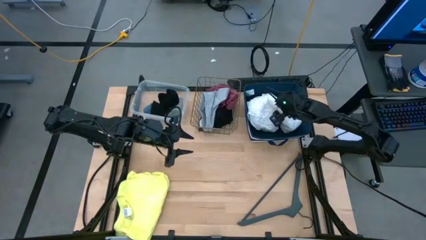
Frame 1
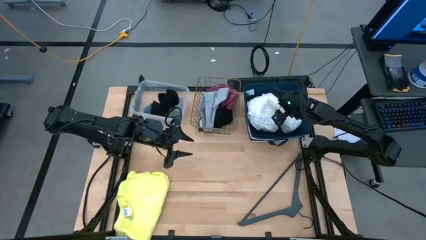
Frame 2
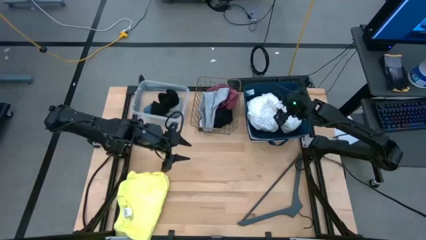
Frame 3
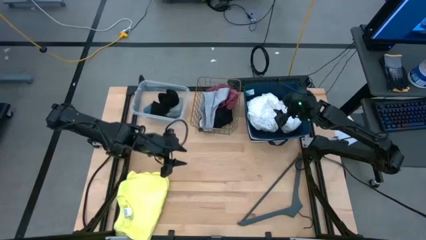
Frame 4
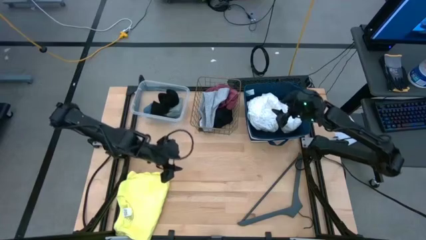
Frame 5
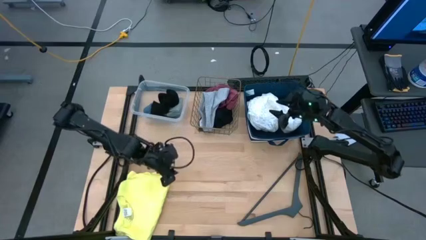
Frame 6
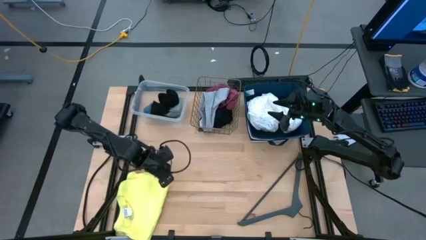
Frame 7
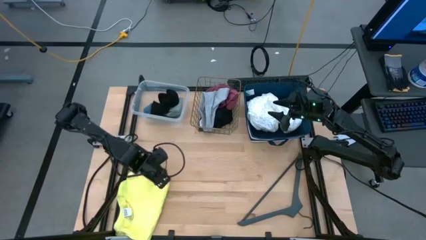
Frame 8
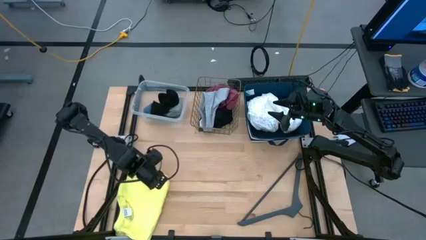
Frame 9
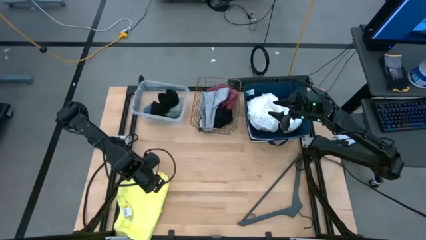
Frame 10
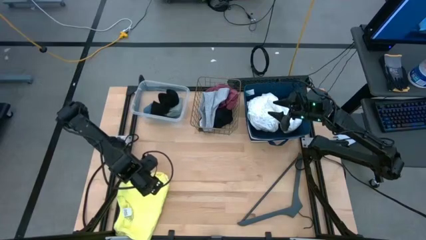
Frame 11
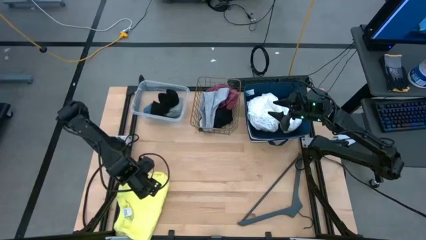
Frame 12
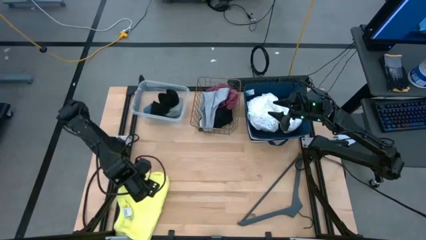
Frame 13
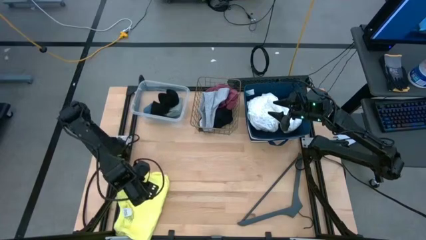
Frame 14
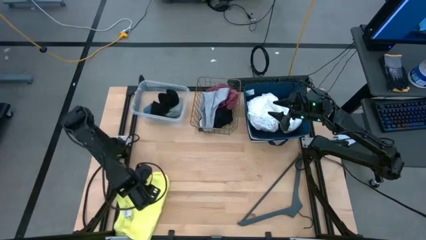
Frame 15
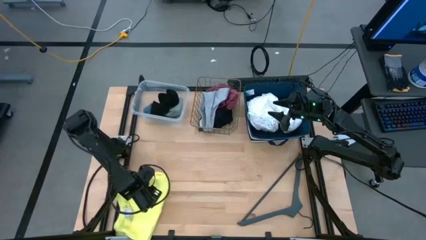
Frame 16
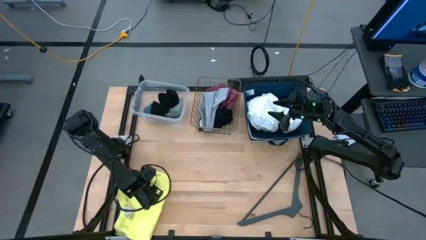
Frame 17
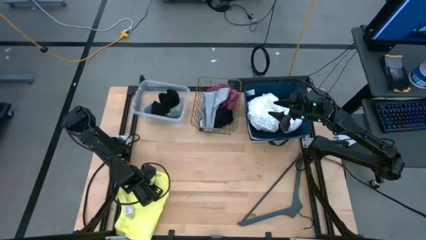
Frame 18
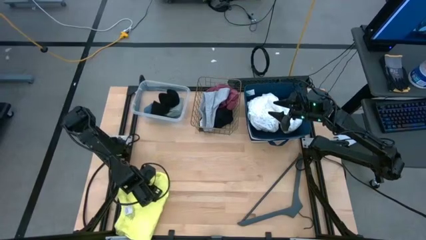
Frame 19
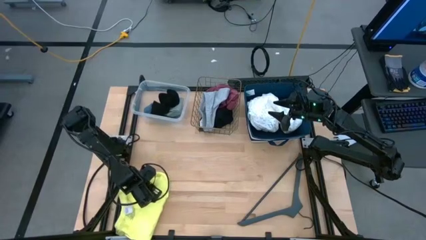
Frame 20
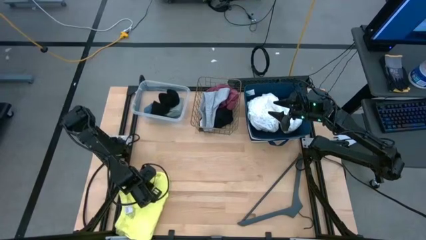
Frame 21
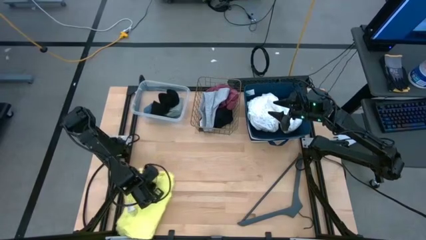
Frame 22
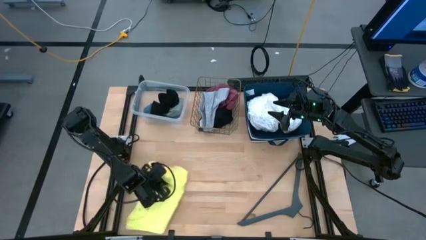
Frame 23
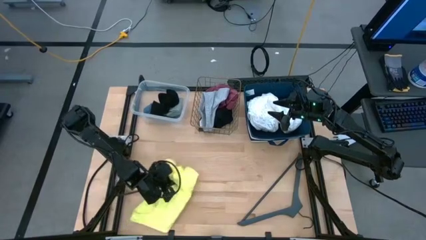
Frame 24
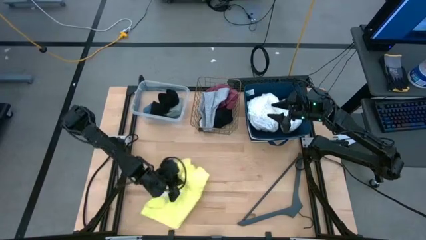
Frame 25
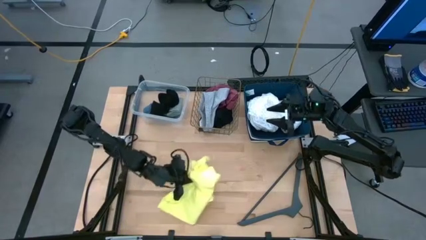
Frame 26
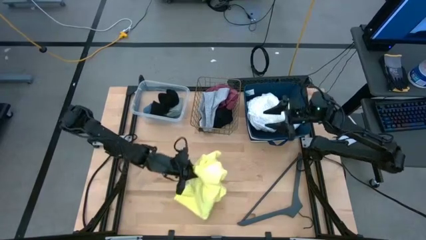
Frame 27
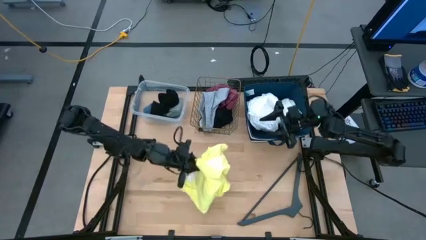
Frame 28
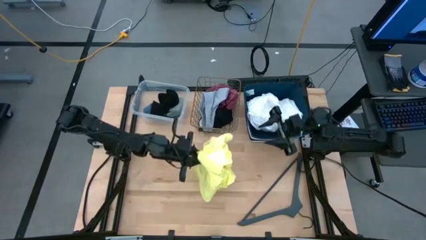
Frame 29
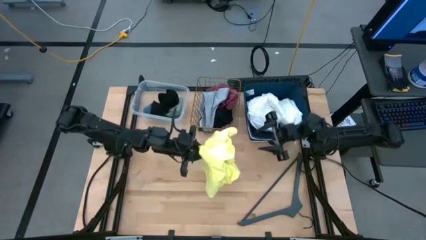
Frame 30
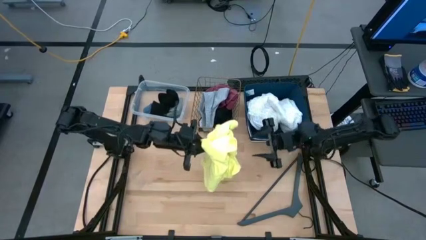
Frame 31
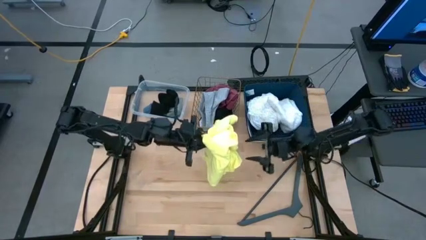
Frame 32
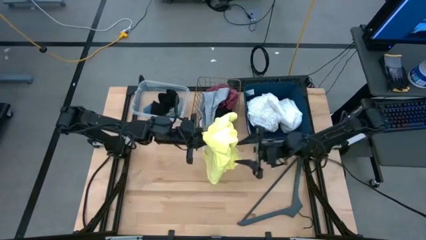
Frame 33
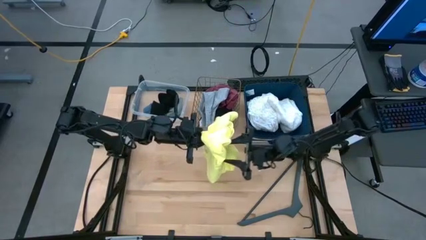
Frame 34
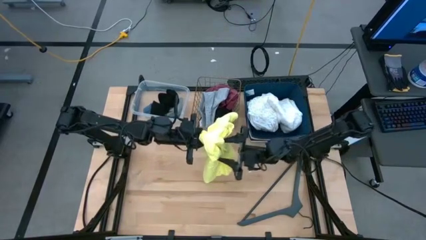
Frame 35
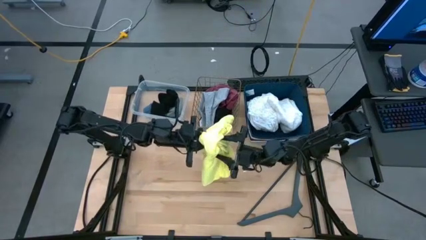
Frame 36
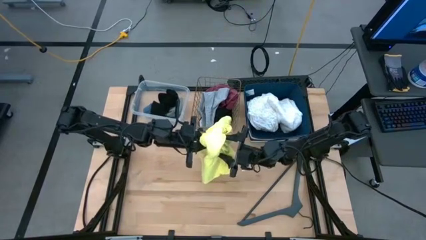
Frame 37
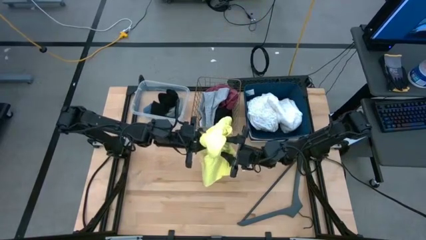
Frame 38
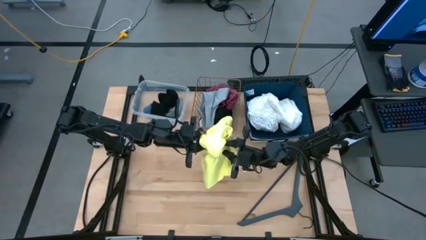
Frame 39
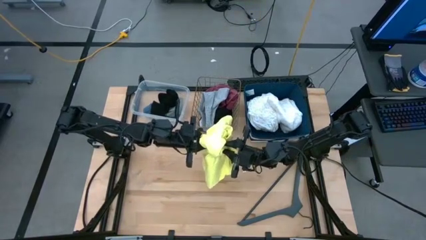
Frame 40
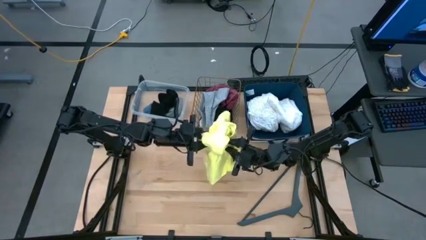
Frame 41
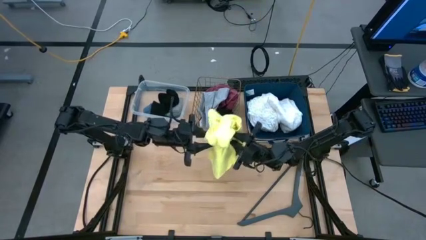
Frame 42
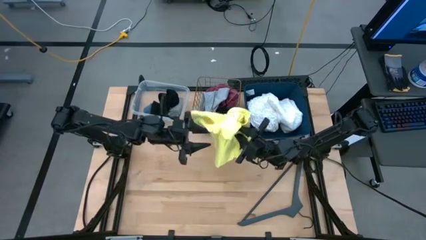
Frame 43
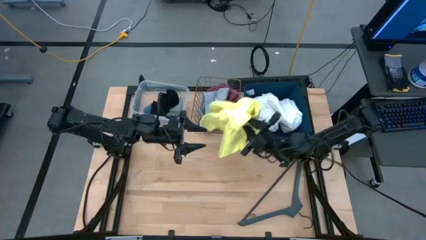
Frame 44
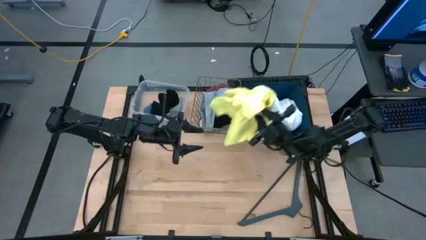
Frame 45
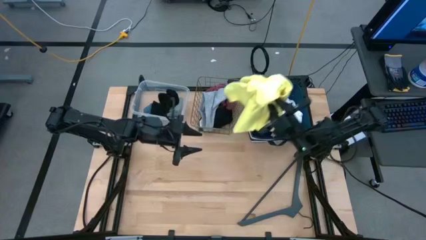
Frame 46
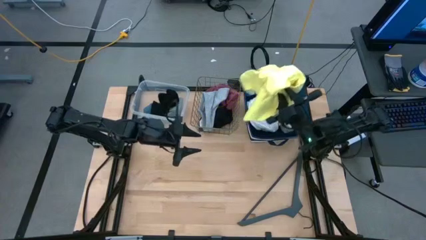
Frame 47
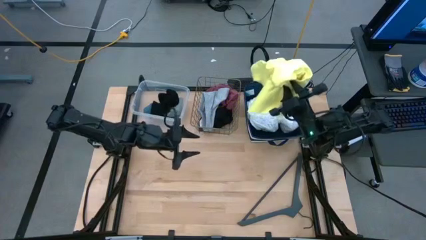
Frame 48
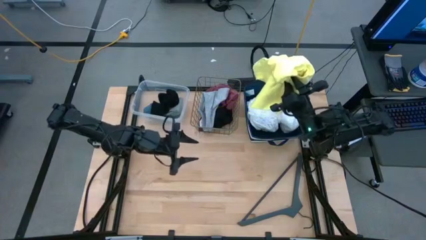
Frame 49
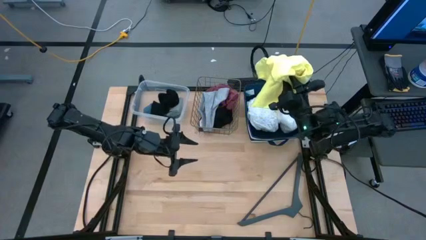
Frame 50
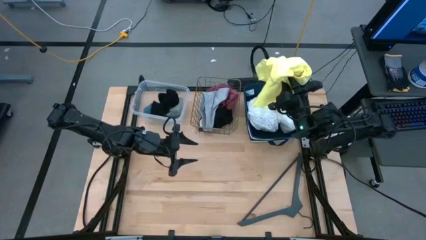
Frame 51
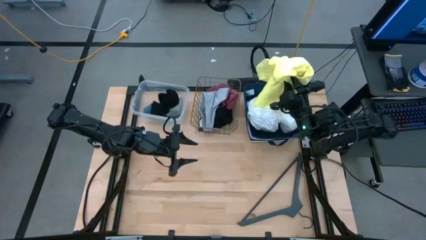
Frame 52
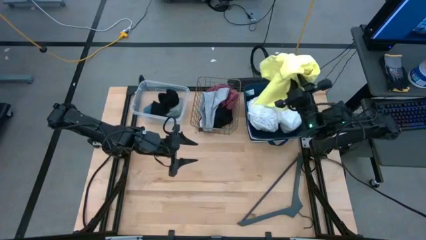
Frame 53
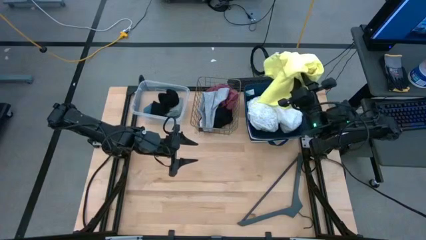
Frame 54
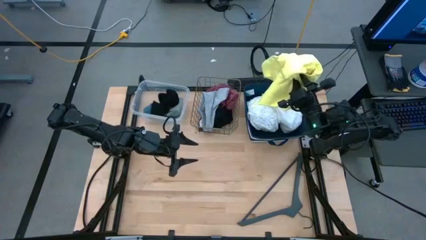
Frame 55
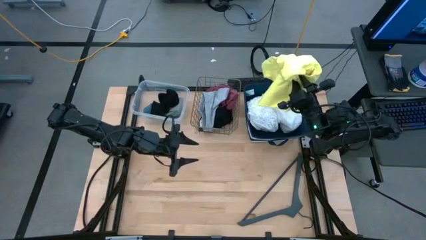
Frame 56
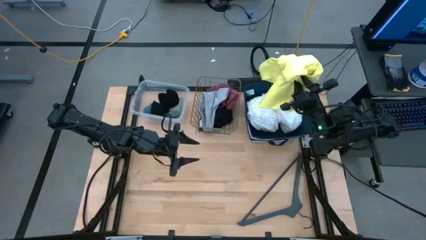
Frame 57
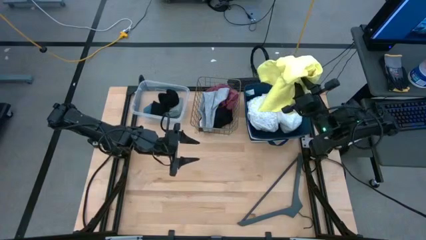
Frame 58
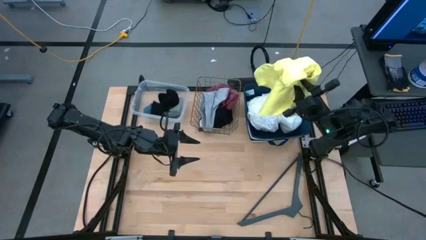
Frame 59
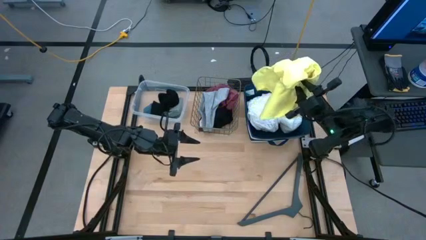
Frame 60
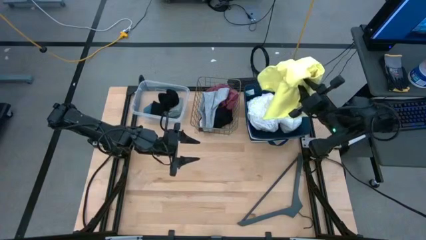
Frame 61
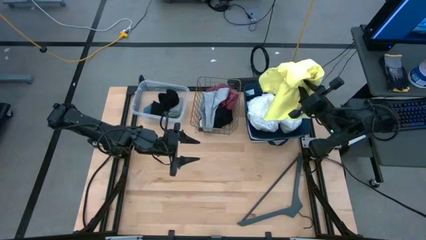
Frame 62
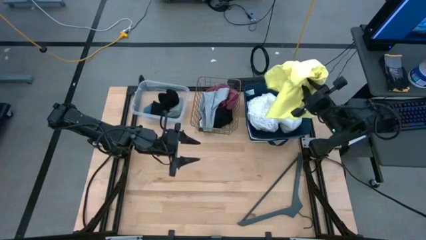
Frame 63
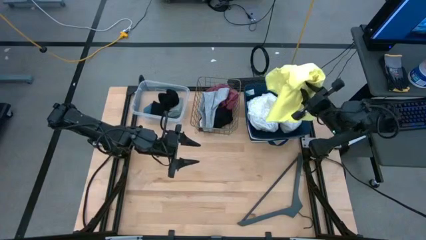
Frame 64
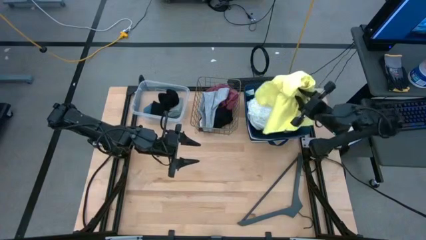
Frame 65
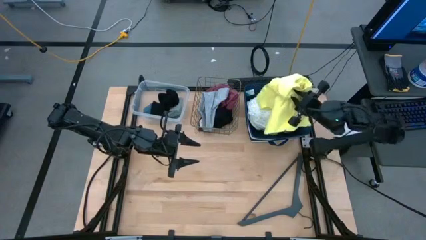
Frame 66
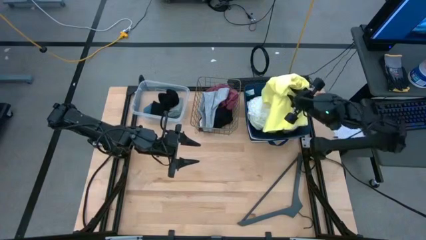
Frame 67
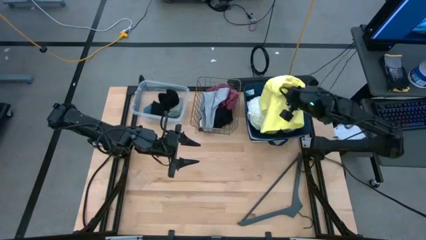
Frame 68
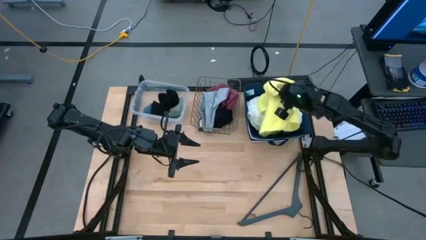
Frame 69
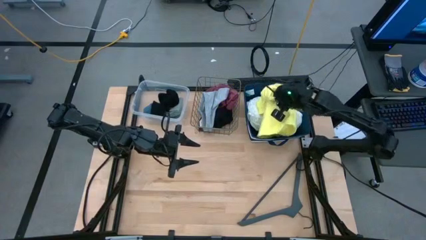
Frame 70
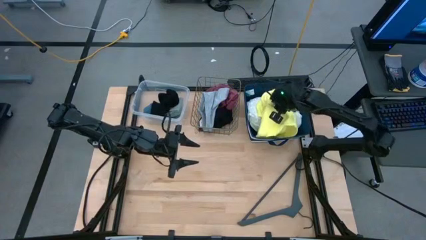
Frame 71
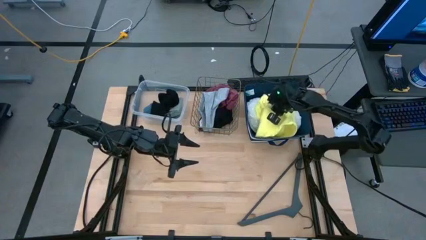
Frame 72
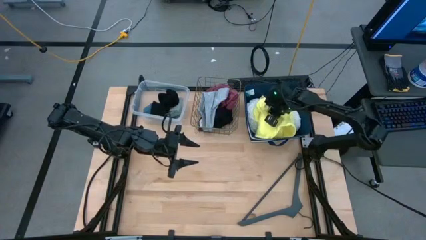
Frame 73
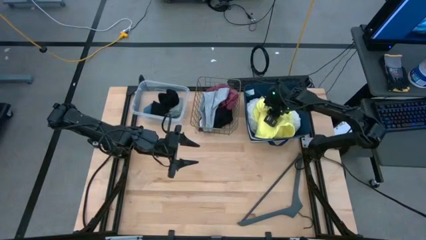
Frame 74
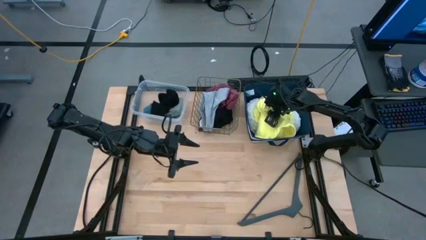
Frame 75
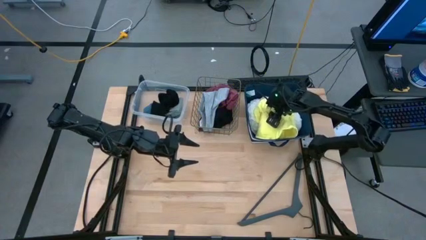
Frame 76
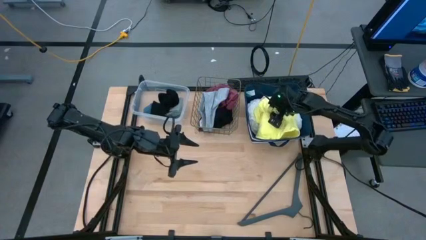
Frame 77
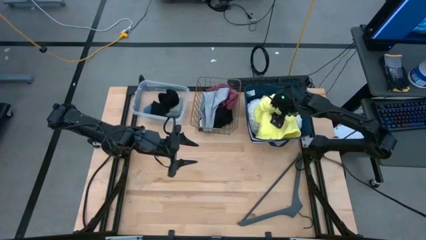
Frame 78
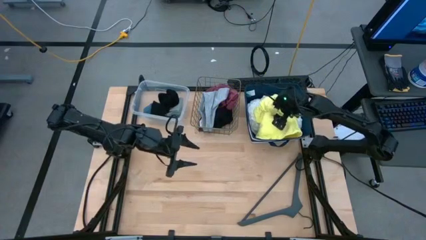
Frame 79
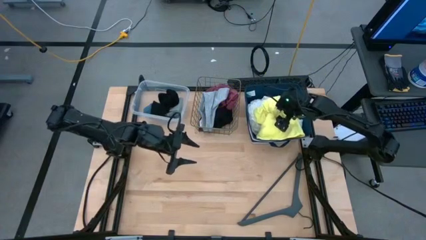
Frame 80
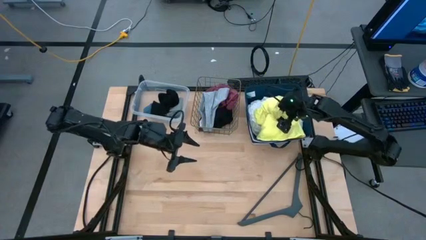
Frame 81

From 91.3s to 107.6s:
Task: Pick & Place Cloths
Put the yellow shirt into the blue laundry organizer
